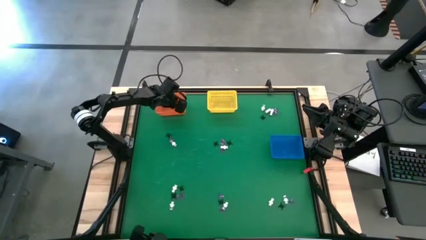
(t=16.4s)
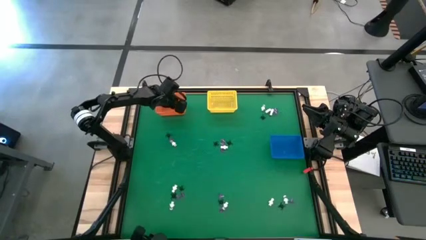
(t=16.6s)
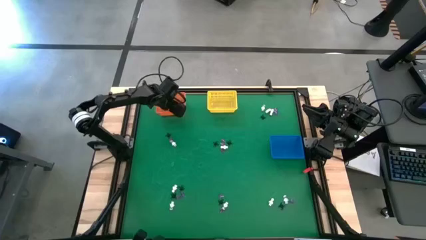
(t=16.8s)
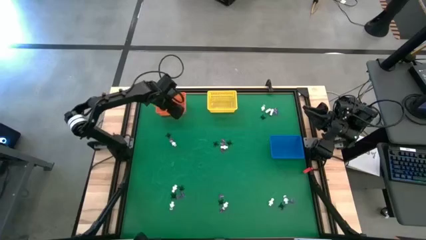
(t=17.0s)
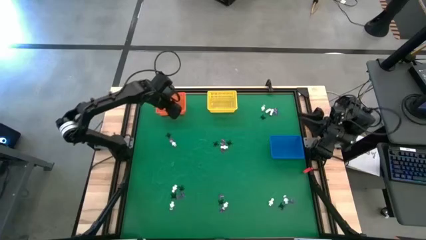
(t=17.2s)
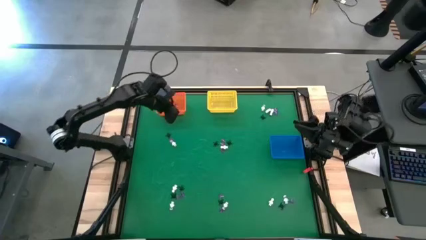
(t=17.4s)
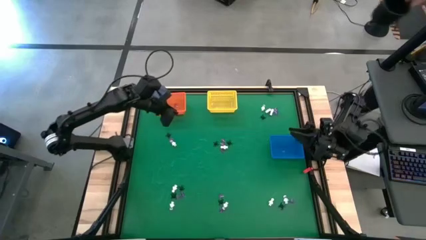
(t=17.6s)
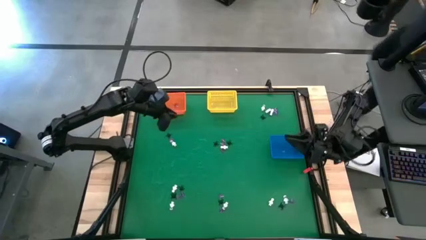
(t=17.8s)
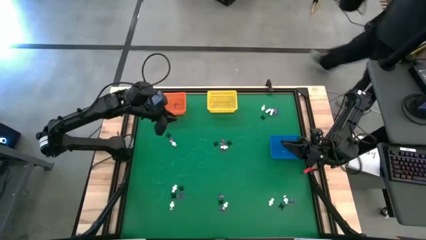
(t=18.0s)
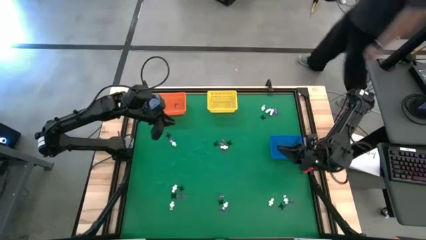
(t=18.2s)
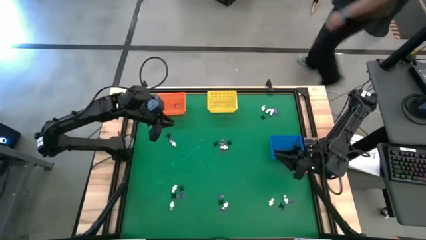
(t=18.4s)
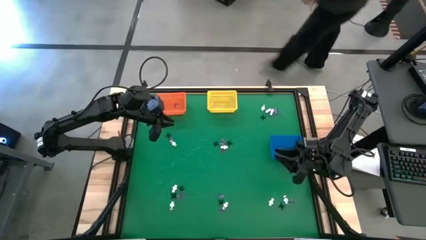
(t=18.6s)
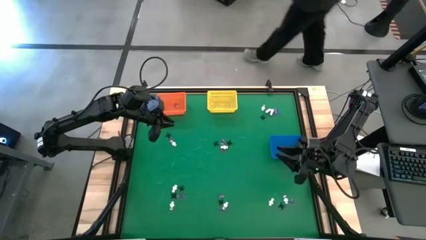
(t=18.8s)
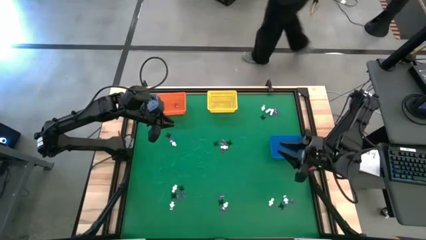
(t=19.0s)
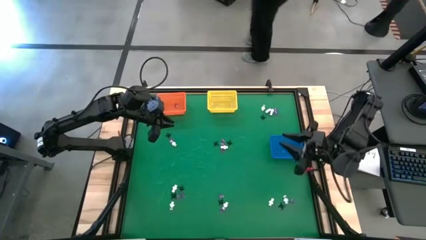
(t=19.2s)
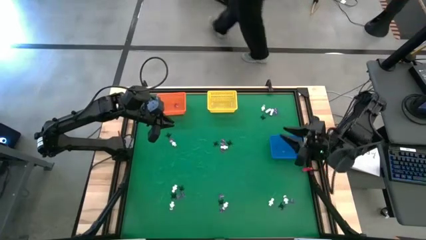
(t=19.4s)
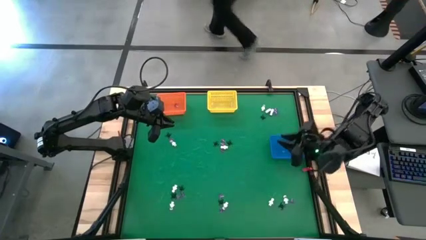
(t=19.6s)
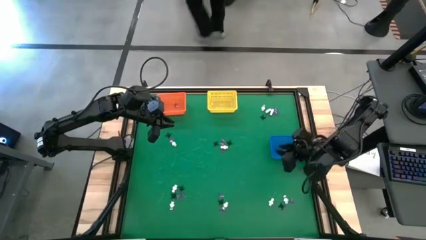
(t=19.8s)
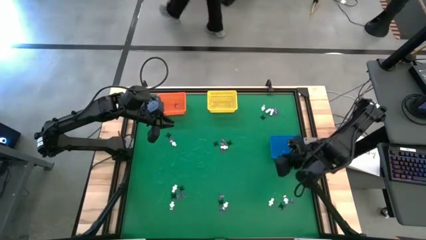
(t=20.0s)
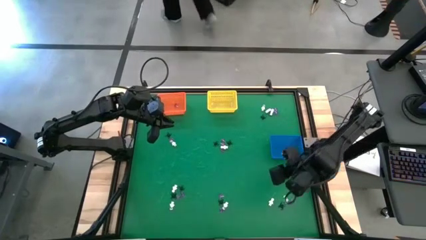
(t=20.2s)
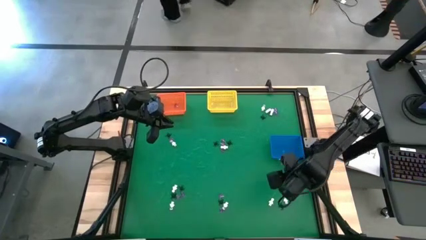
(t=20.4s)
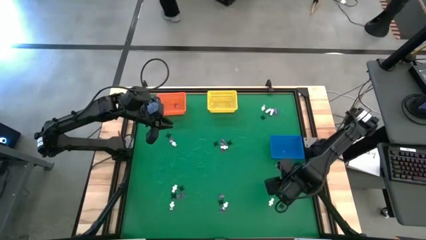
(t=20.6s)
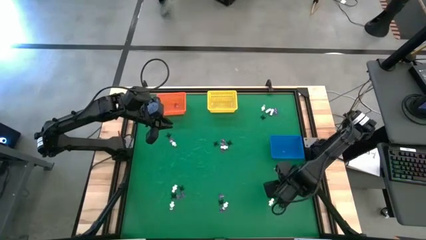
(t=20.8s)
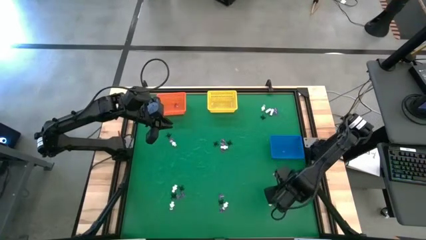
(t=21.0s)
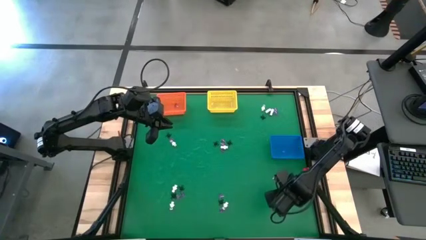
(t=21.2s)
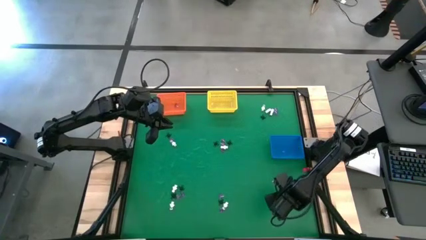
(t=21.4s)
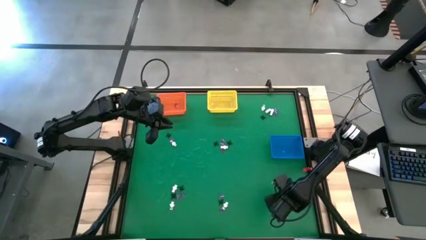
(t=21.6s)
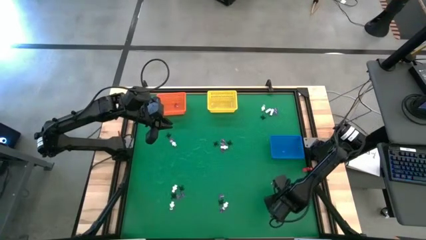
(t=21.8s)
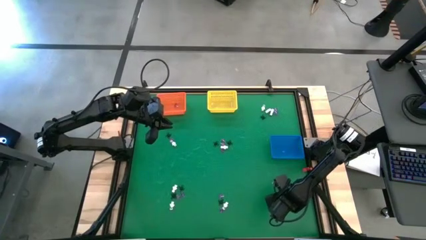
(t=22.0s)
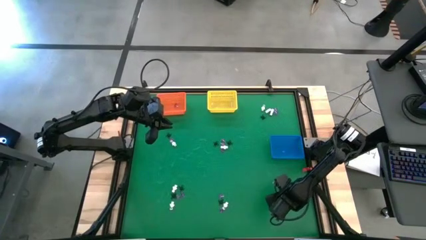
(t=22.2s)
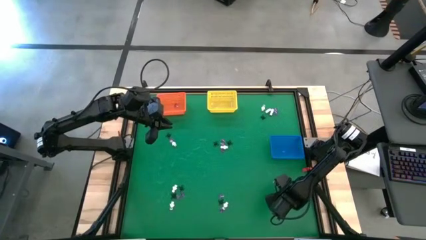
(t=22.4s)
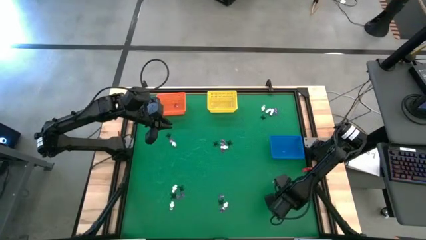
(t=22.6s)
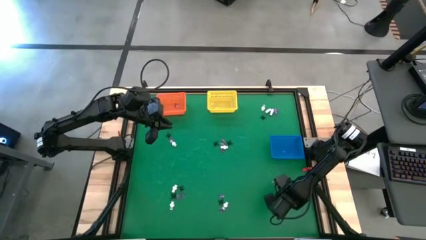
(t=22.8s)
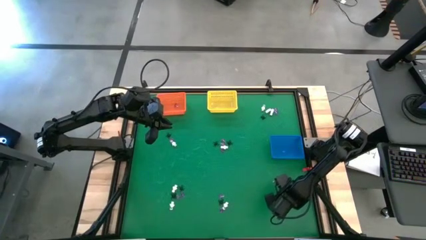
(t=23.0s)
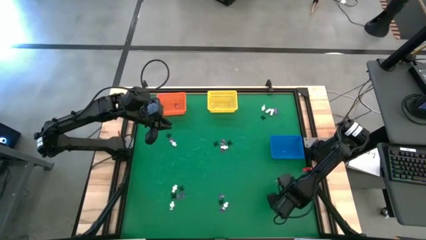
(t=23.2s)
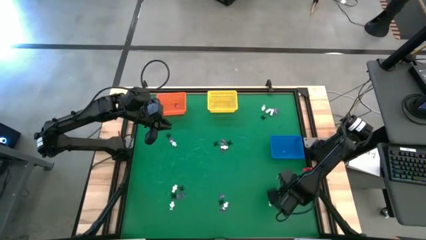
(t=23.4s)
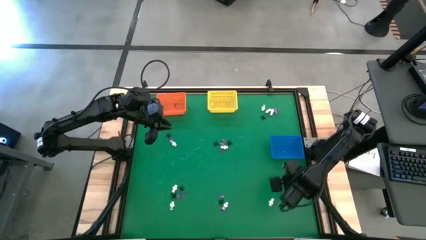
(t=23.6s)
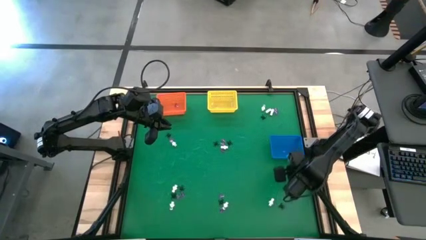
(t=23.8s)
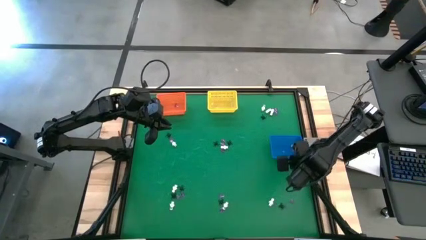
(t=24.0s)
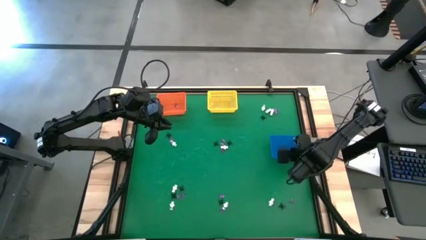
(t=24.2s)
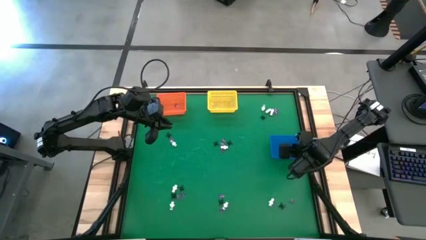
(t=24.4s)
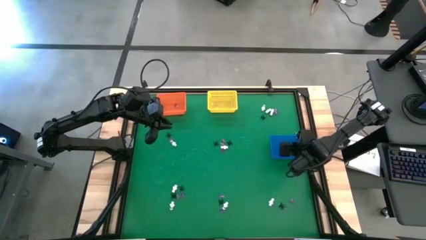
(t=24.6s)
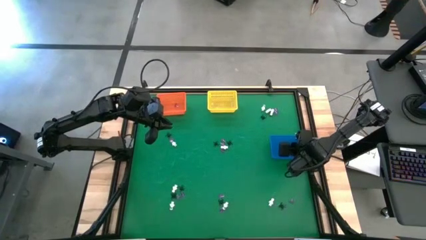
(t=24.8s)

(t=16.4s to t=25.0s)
Task: Sort Halloween decoration
Put the white skeleton toy into the blue basket

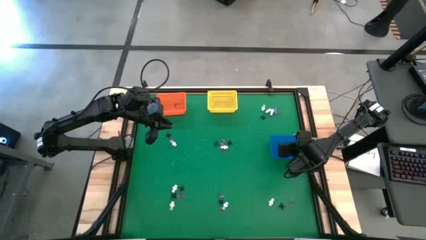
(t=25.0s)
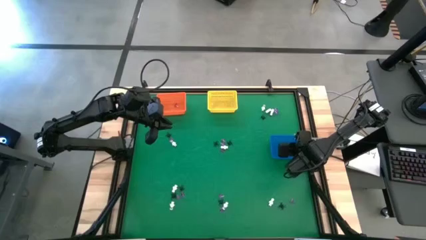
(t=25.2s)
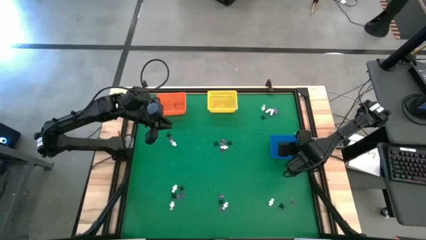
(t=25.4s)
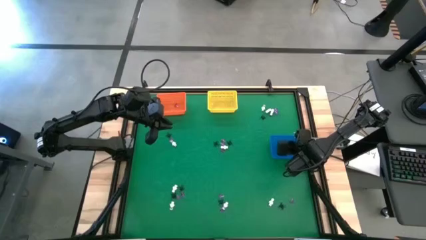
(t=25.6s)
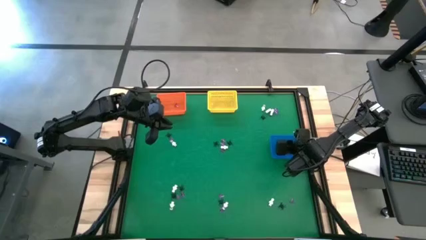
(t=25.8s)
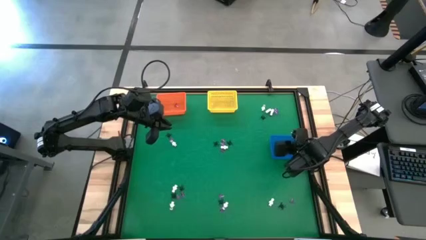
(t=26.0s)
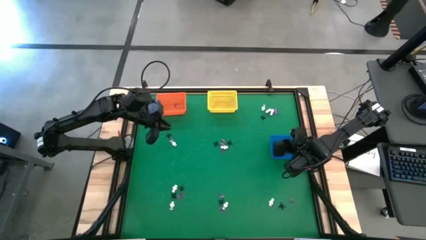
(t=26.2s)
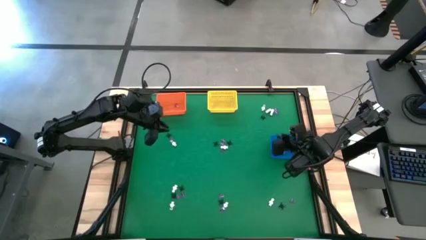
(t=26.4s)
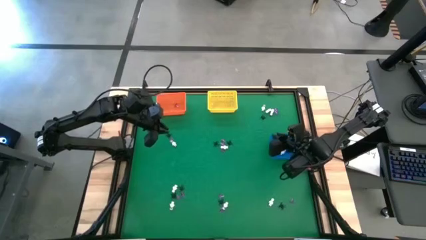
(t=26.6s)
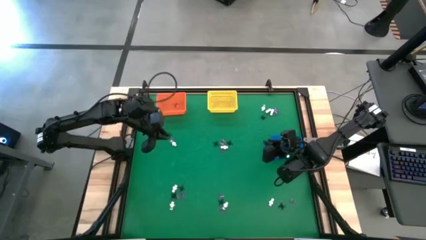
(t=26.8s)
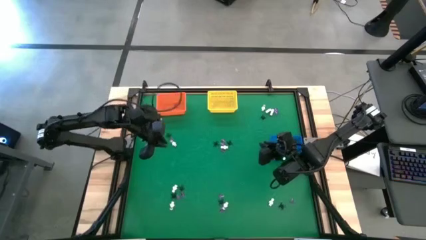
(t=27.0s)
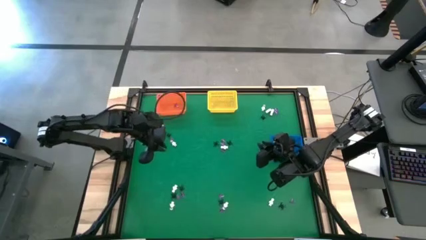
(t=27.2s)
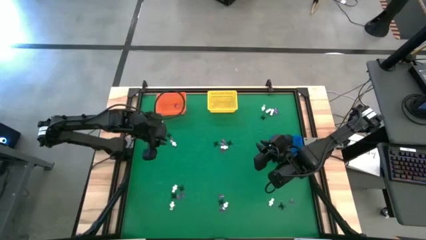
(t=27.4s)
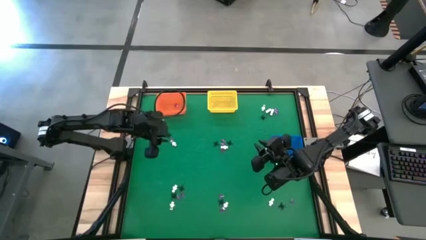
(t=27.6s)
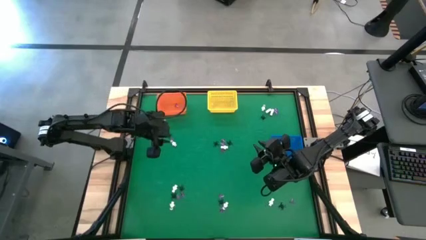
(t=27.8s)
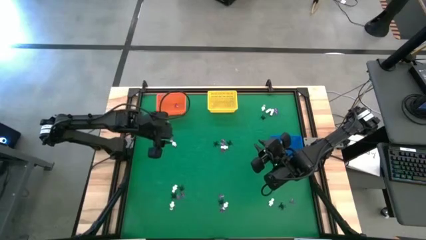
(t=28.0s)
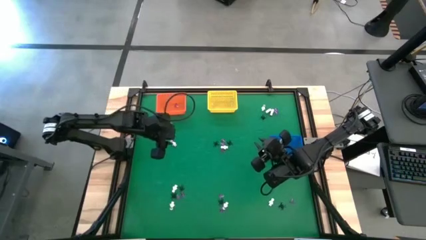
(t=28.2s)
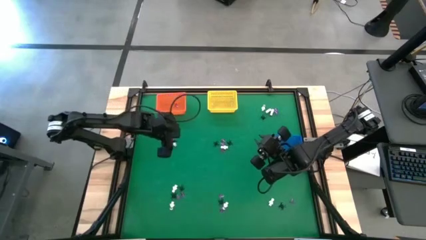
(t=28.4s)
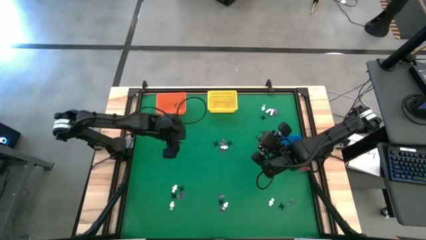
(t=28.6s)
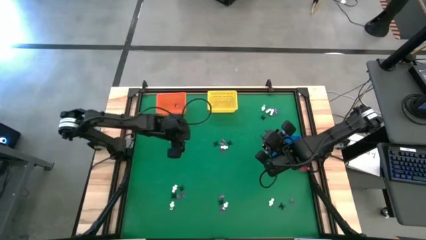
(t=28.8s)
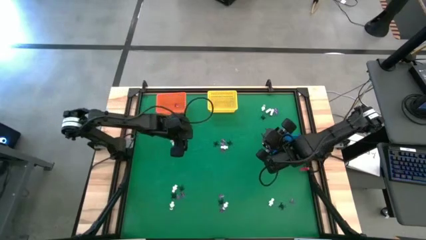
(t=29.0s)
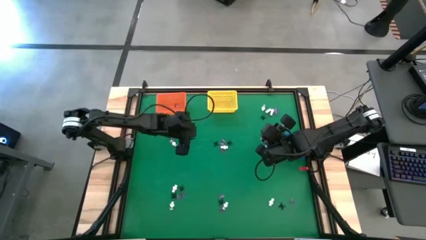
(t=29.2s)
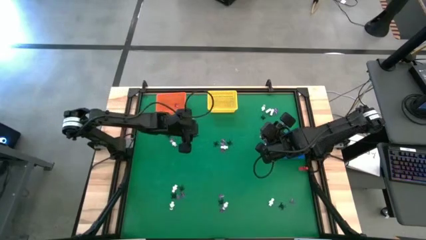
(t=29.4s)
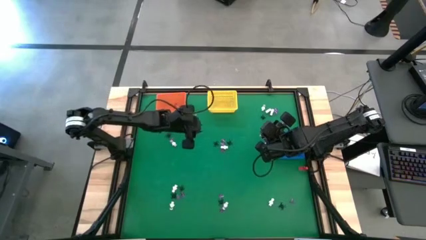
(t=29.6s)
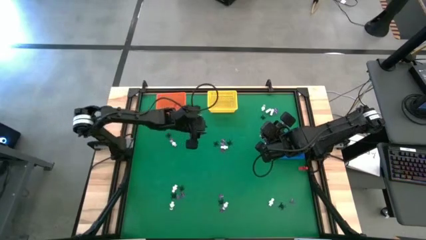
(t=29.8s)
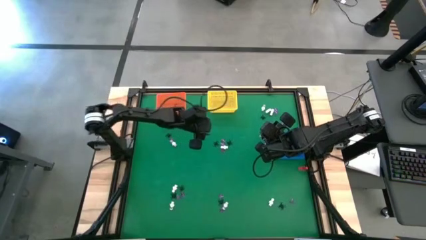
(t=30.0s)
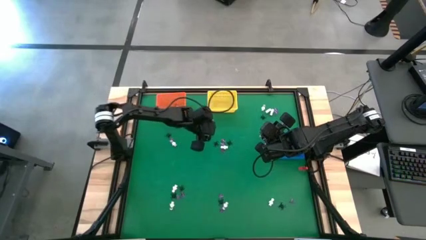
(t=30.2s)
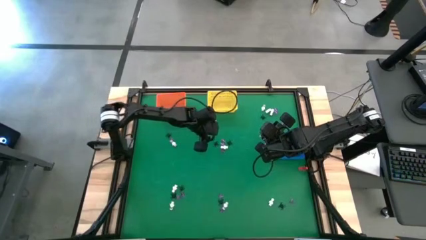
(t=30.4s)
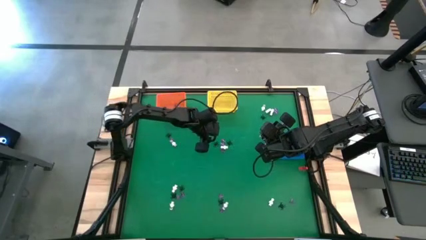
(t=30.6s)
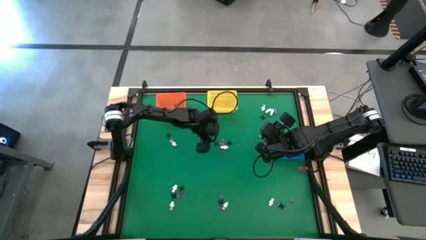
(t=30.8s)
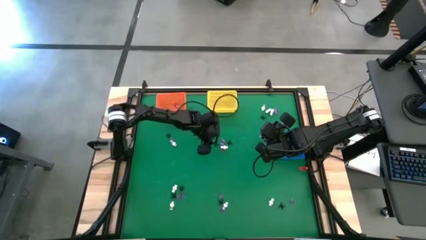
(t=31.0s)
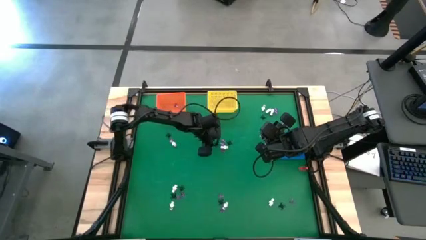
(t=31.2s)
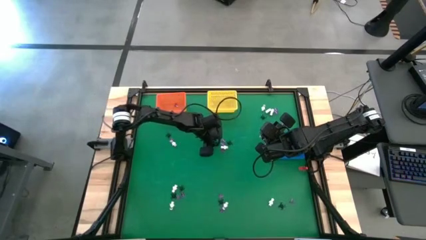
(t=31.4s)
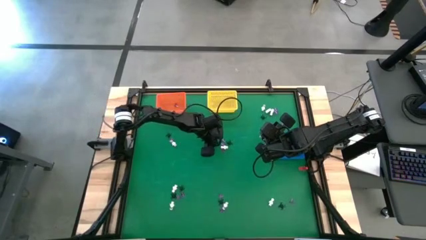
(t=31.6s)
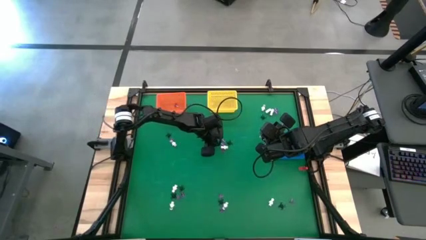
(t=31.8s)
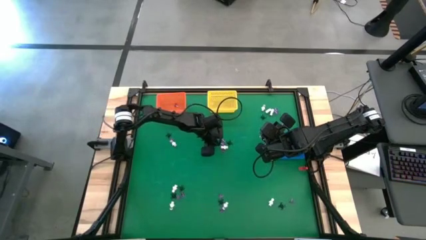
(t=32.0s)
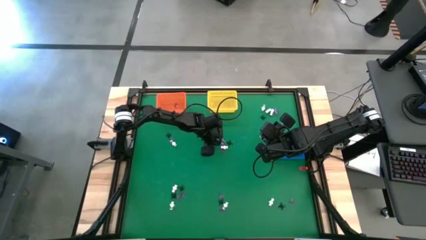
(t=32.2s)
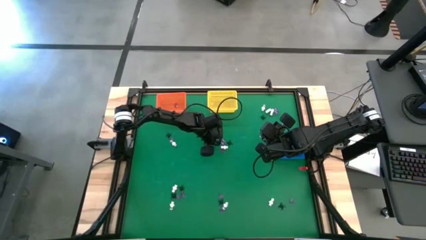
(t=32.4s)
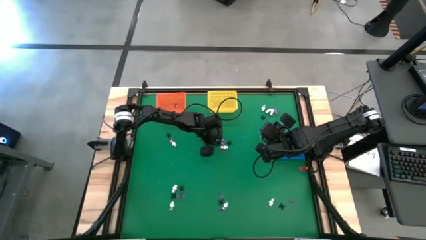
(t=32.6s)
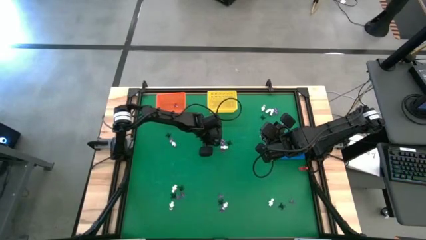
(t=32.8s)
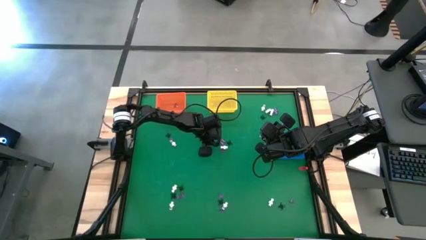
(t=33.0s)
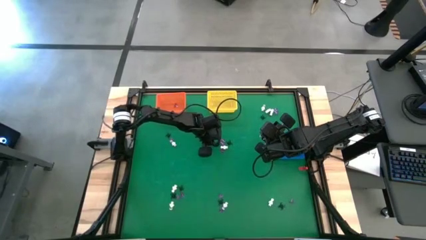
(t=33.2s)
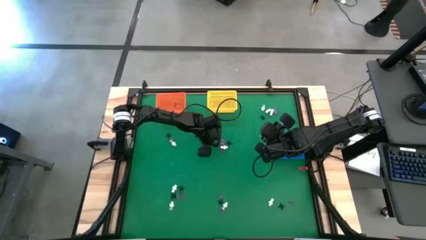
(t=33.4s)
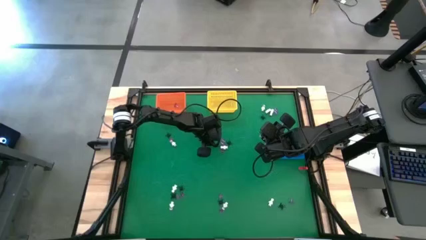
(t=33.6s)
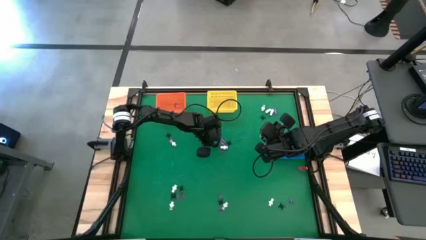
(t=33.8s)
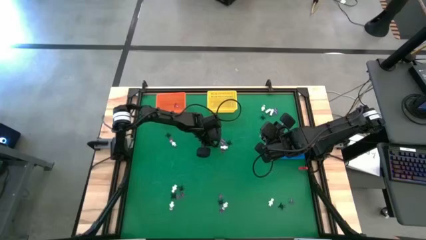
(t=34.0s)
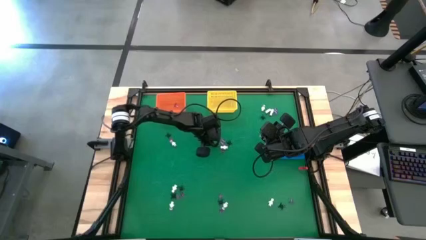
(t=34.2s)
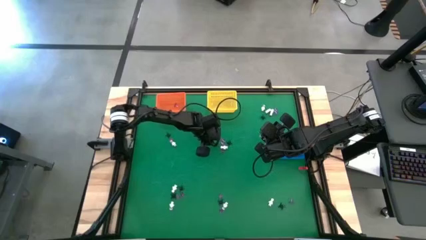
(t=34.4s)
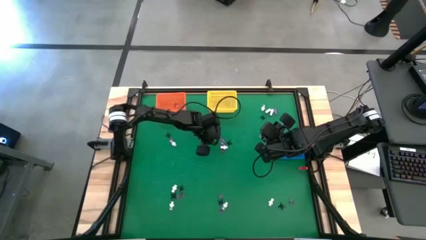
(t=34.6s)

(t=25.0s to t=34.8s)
Put the black spider toy into the yellow basket
